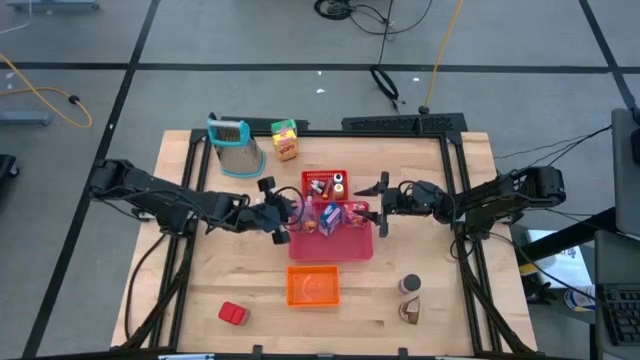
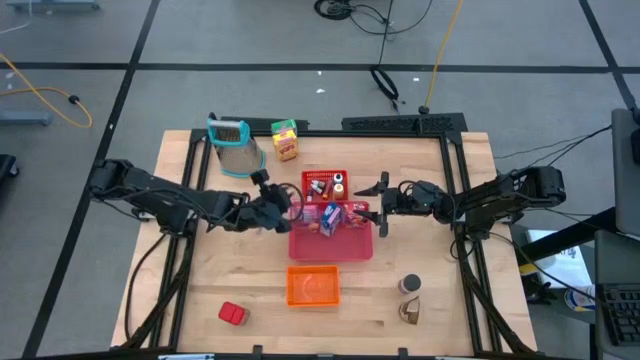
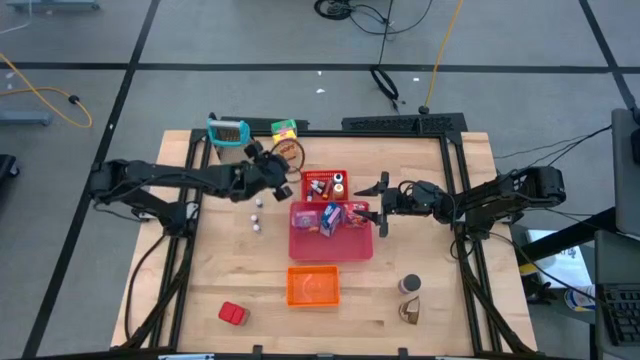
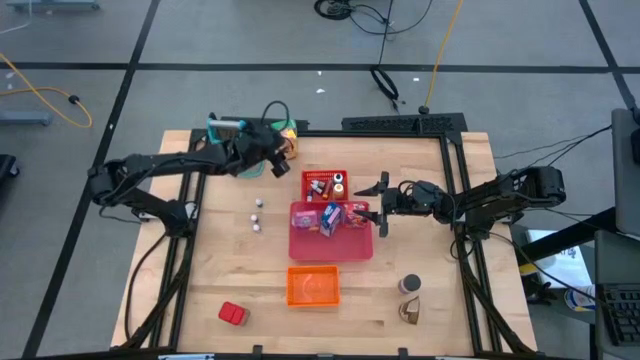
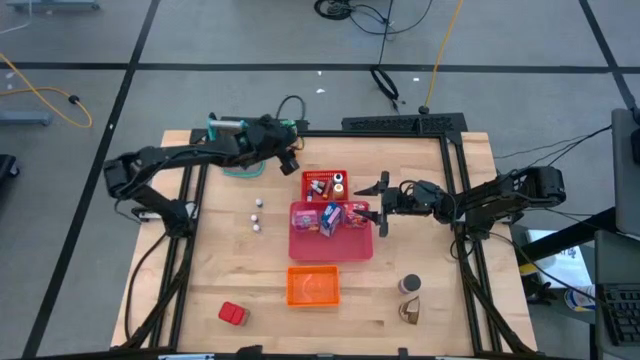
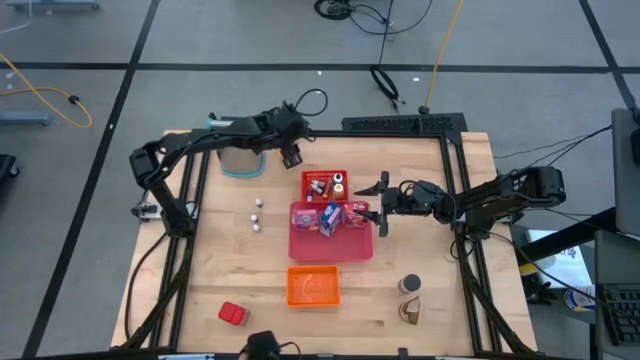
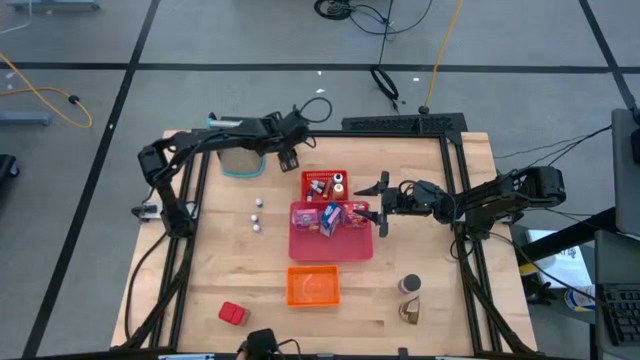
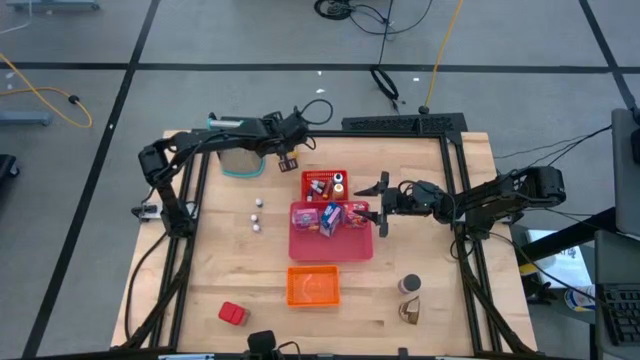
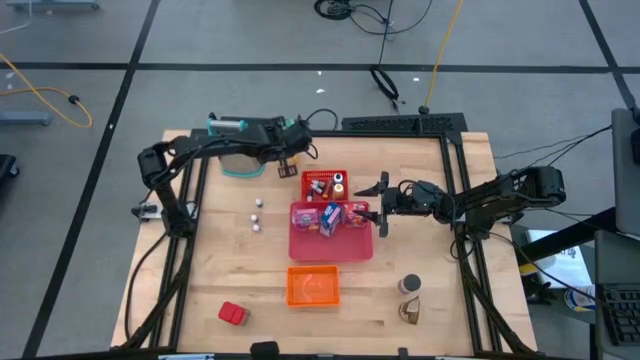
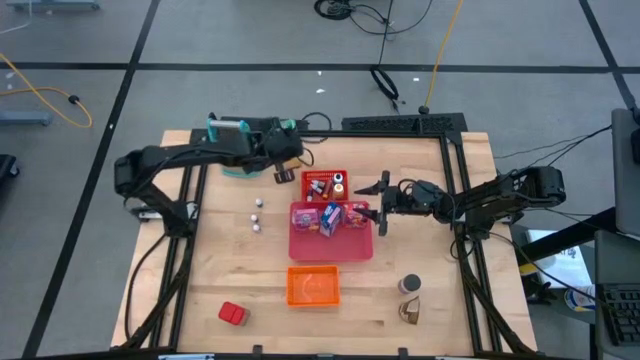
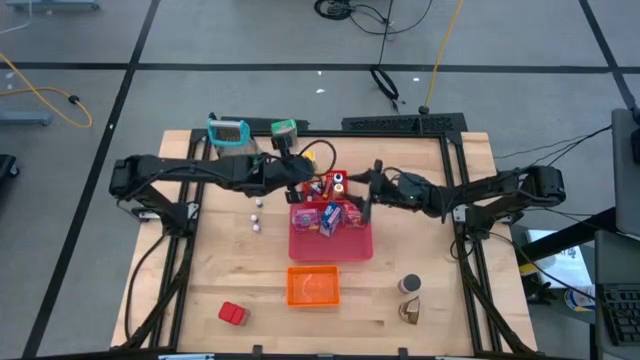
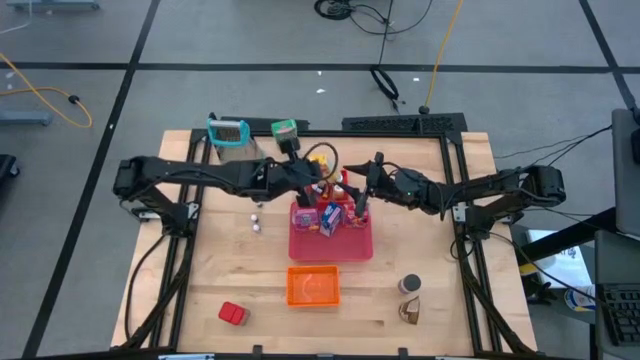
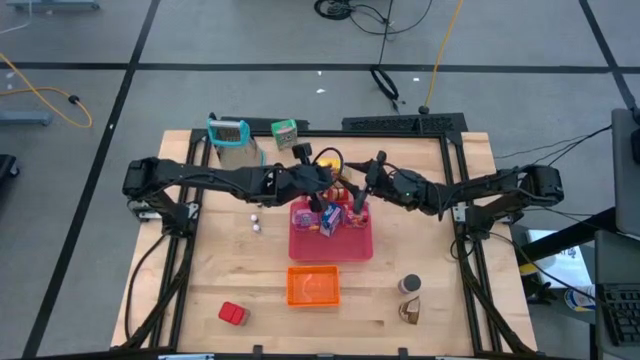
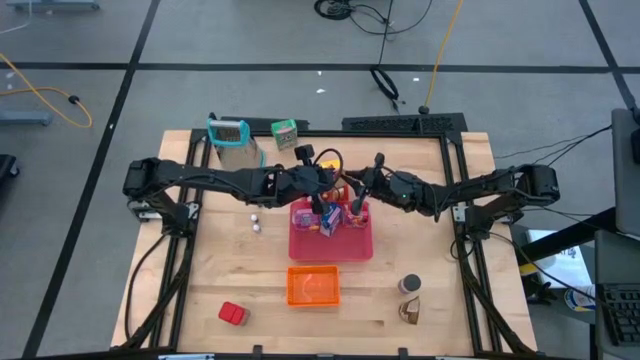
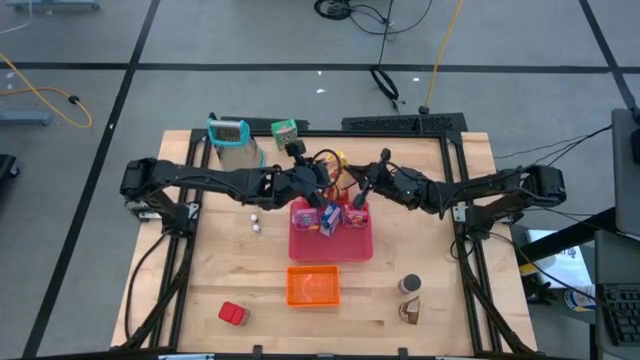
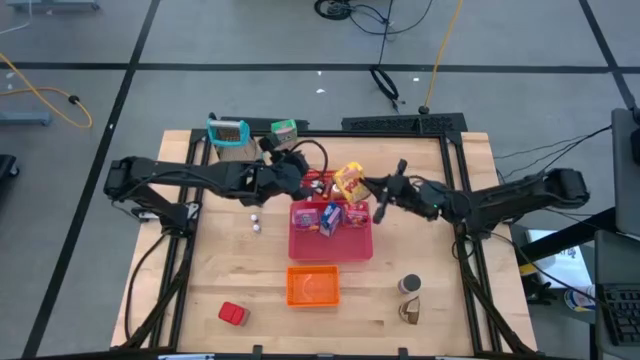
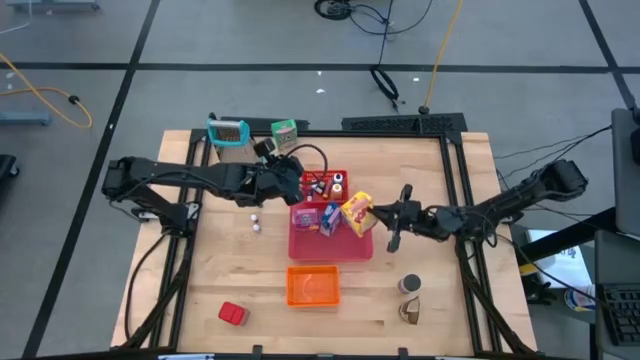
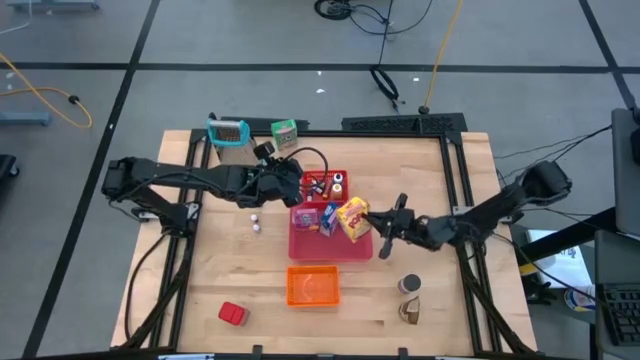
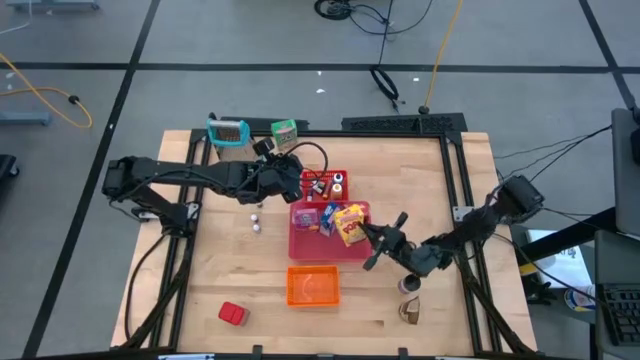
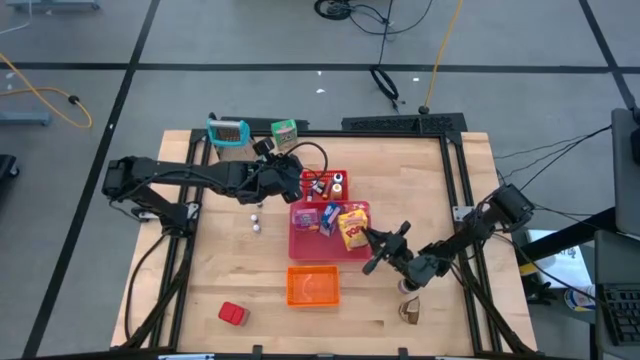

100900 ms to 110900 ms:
Task: Pick & Place Kitchen Items
Put the yellow cereal box into the pink bin

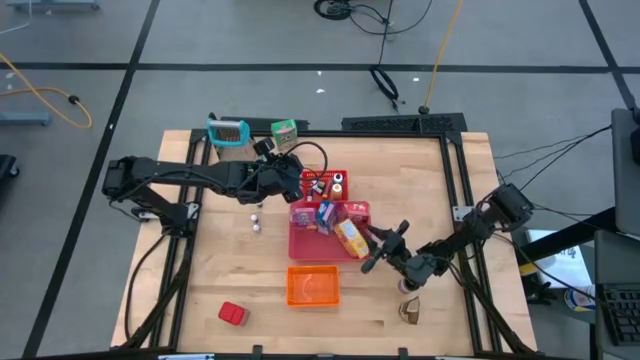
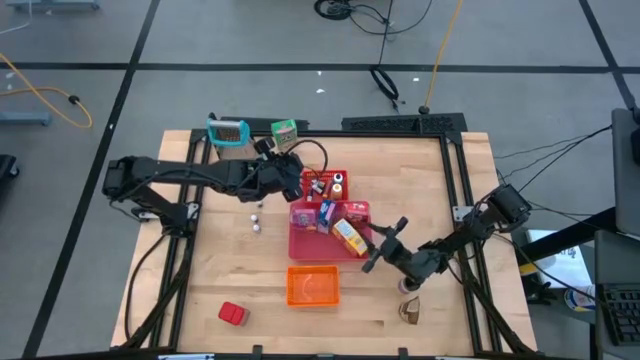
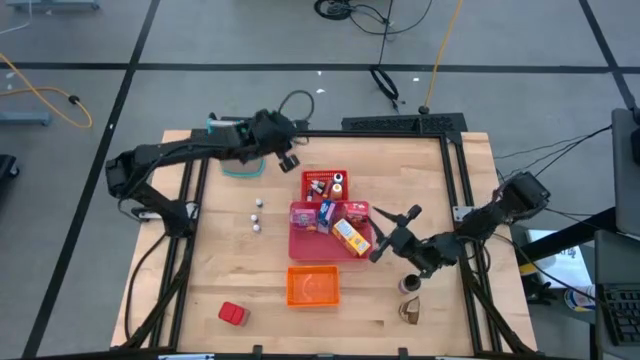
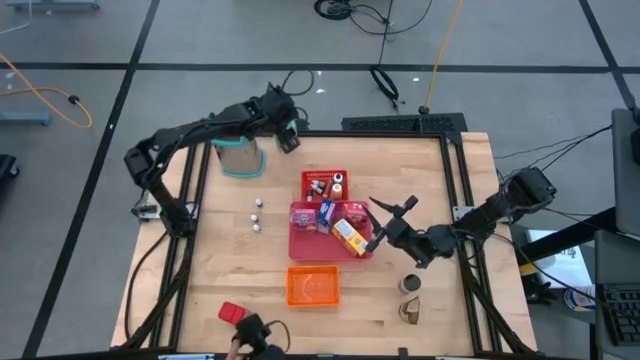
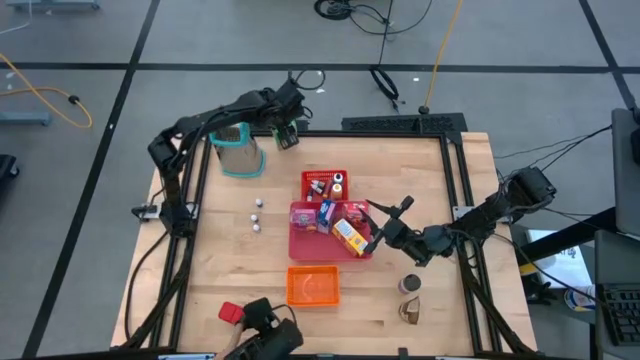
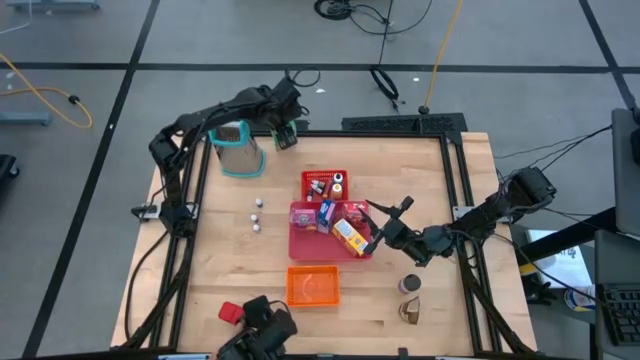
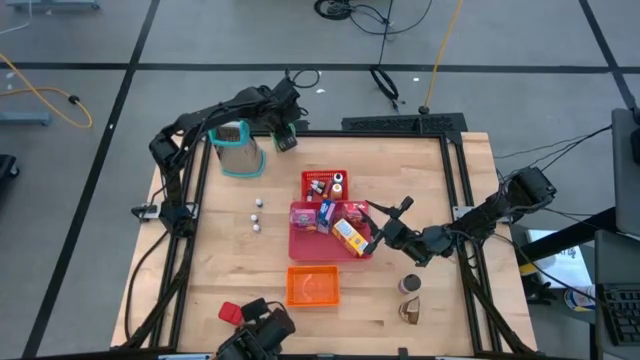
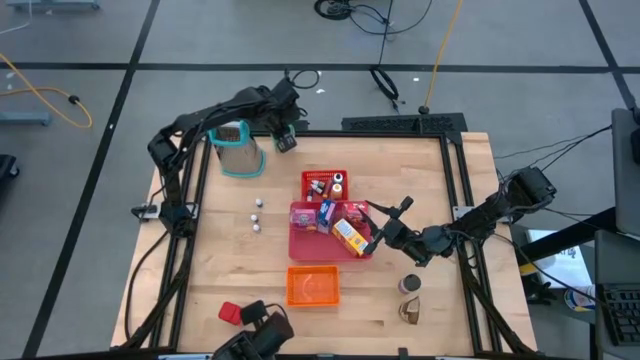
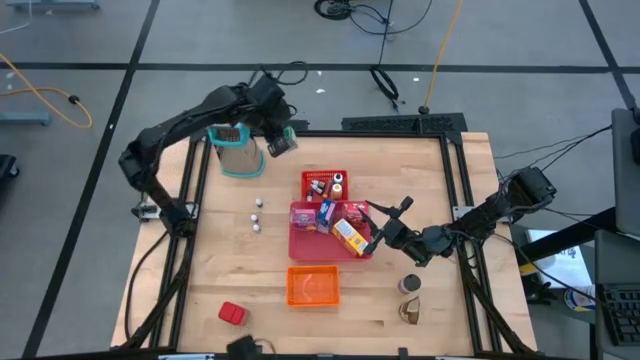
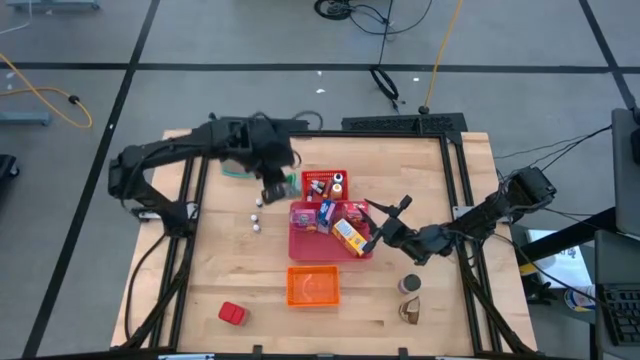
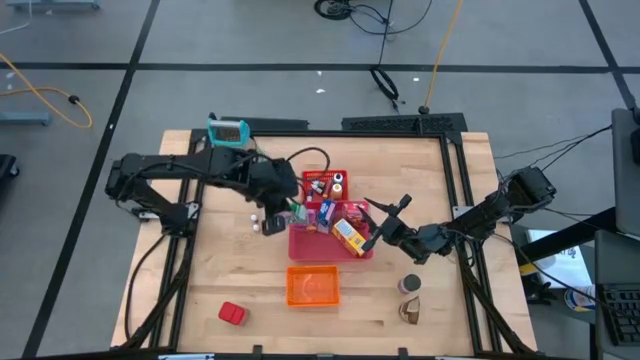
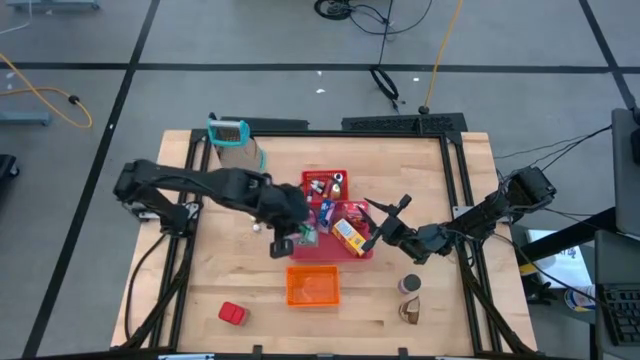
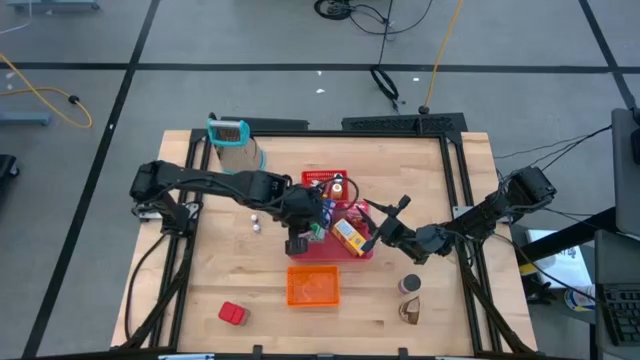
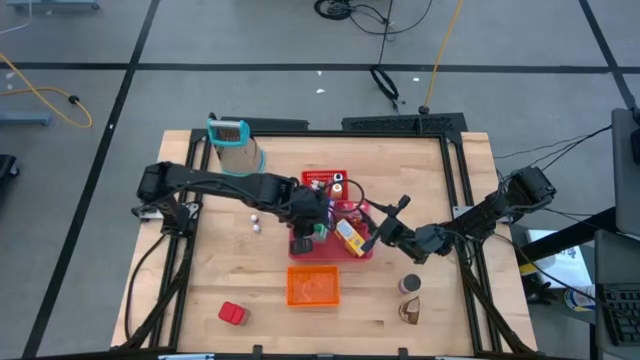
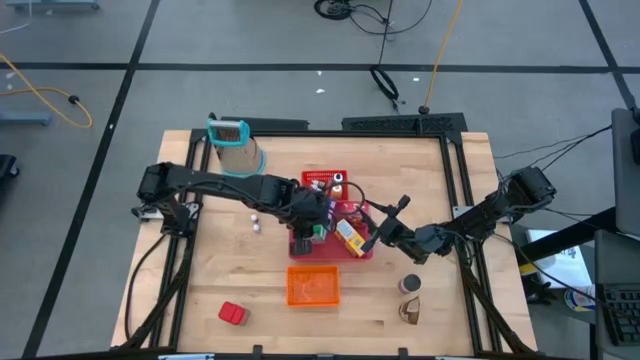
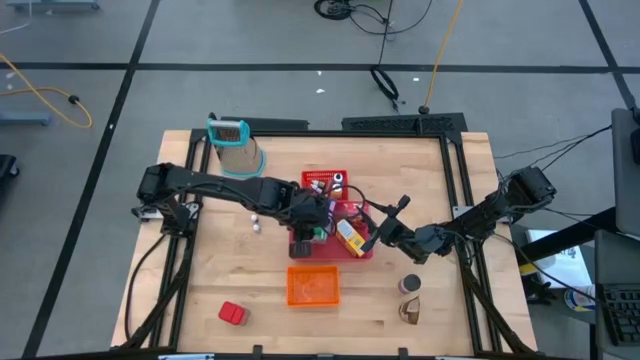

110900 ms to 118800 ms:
Put the green cereal box into the pink bin

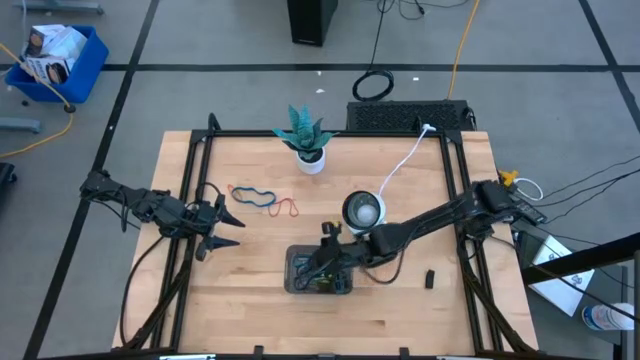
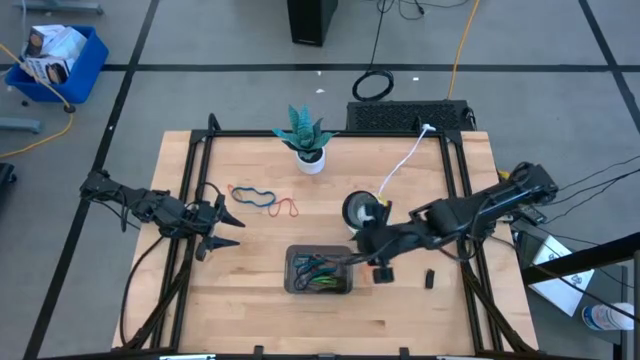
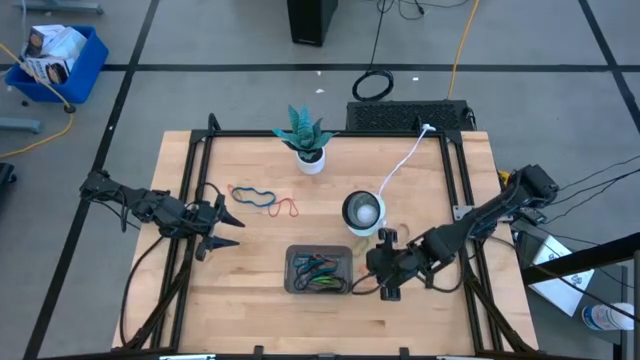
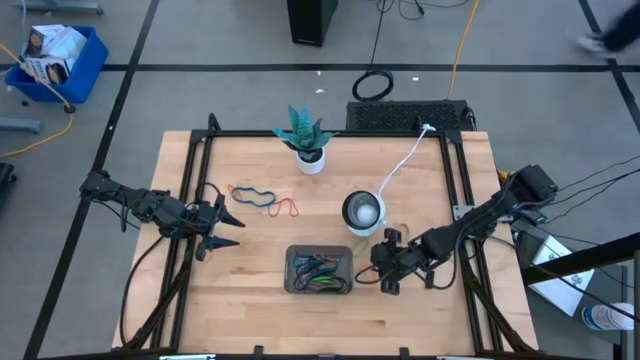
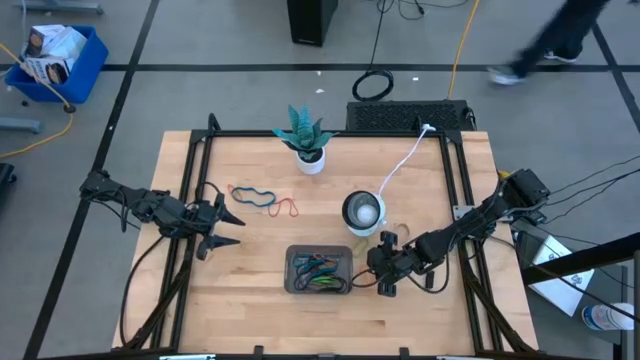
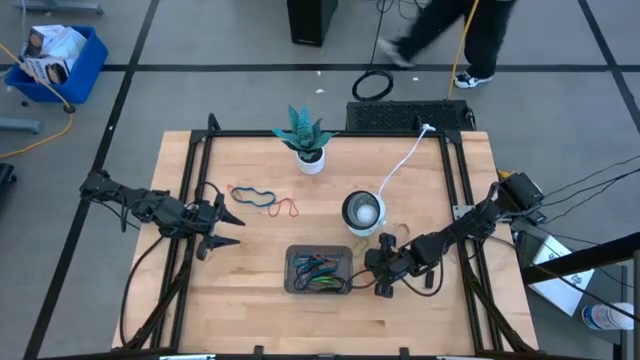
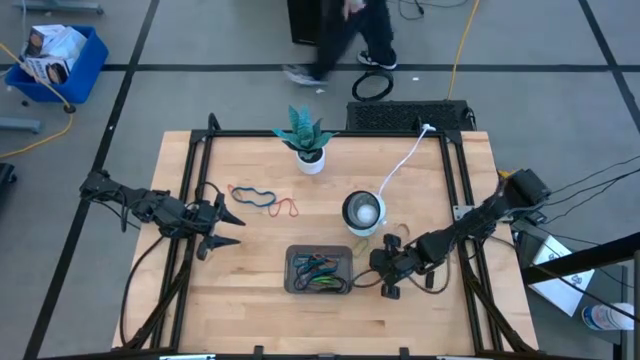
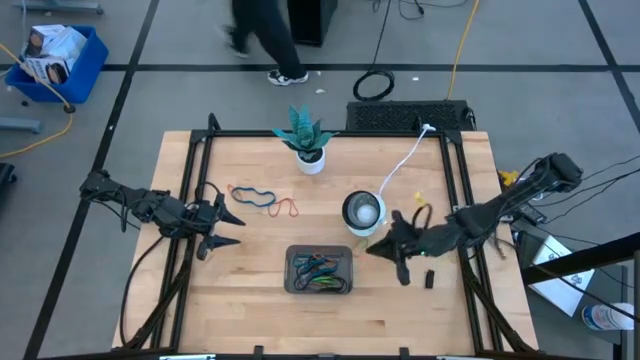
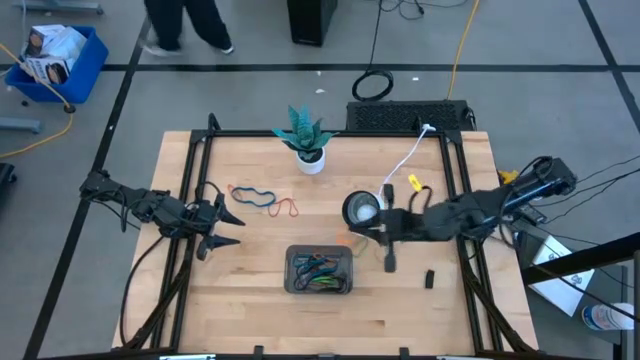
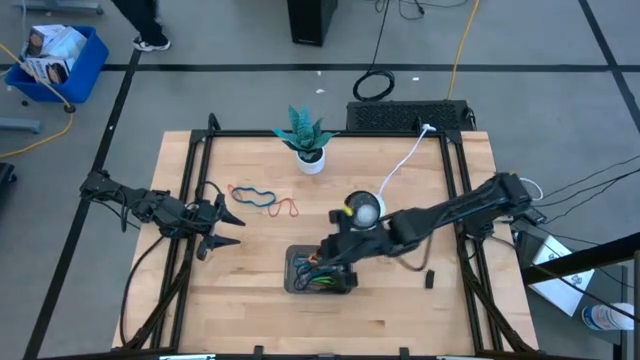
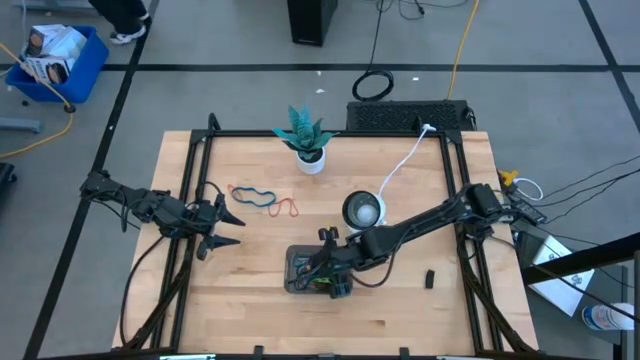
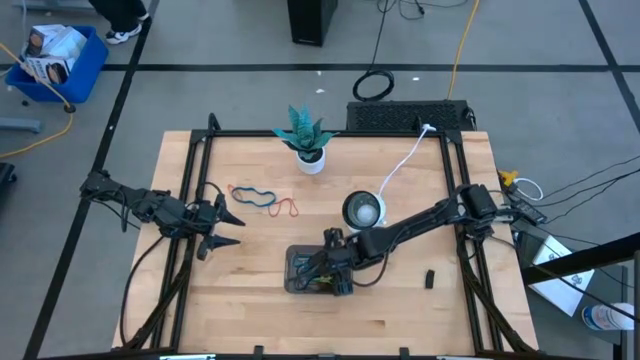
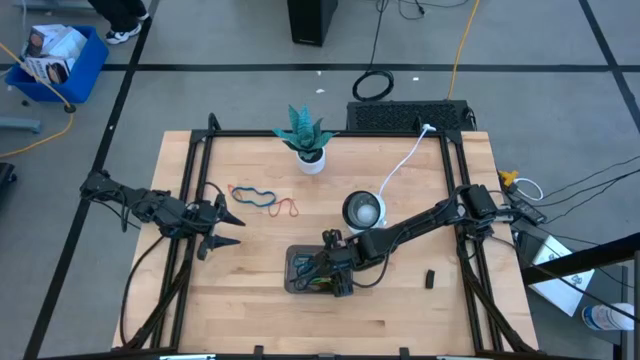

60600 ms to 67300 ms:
Task: Pick and place rubber bands into bin
Put the bottom orange rubber band into the gray bin
